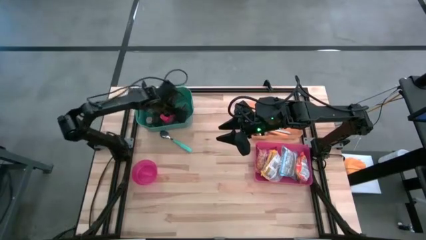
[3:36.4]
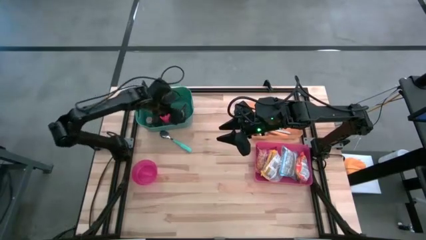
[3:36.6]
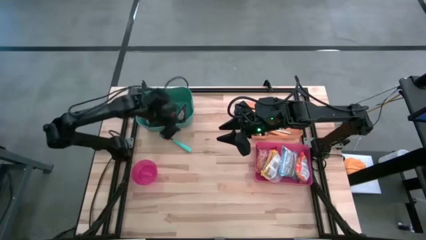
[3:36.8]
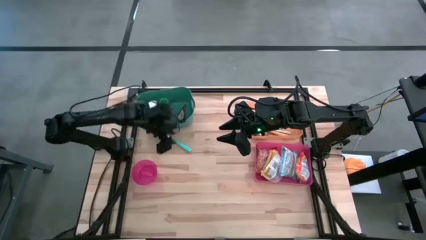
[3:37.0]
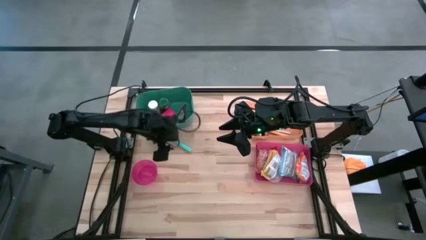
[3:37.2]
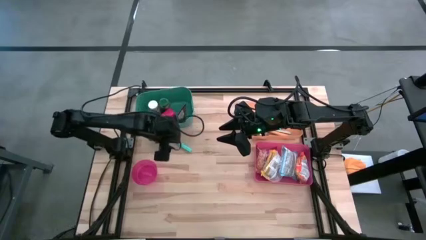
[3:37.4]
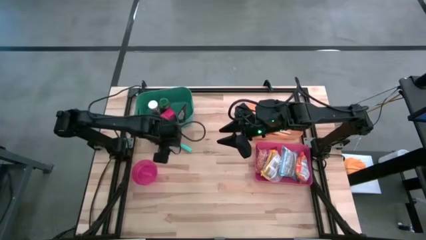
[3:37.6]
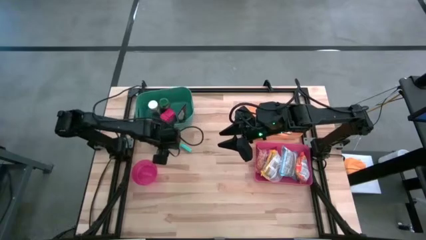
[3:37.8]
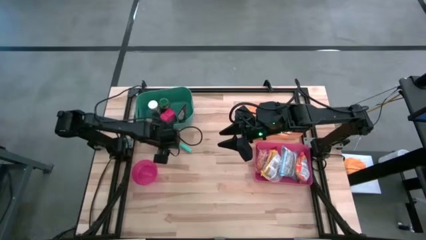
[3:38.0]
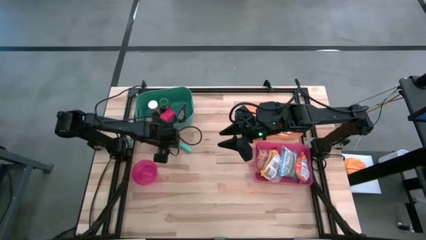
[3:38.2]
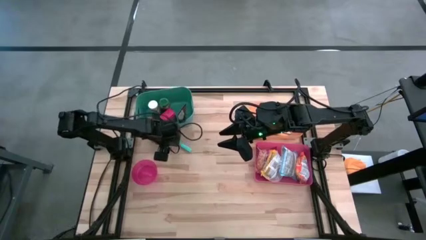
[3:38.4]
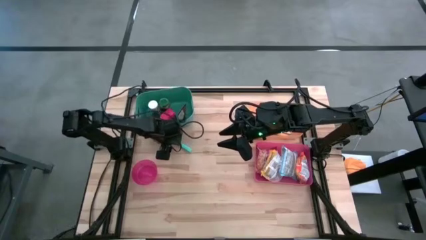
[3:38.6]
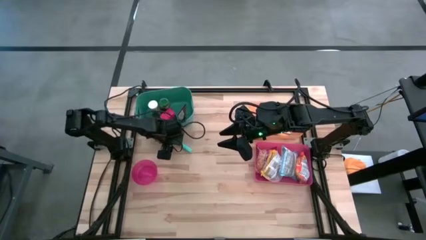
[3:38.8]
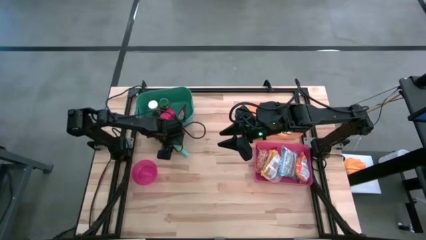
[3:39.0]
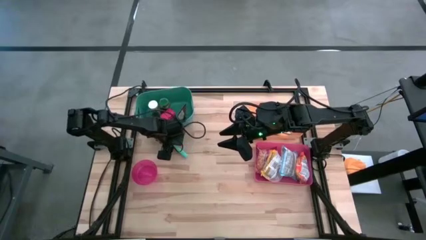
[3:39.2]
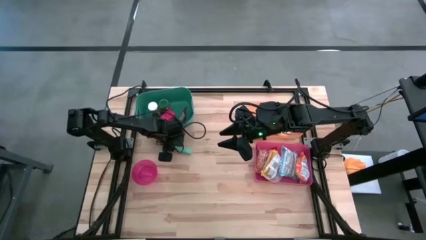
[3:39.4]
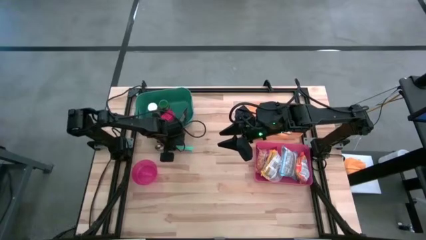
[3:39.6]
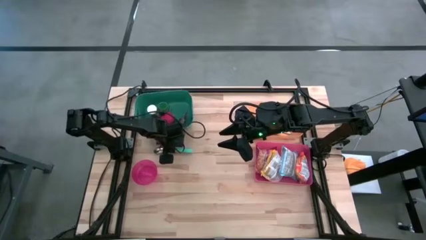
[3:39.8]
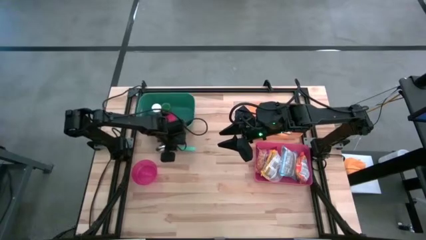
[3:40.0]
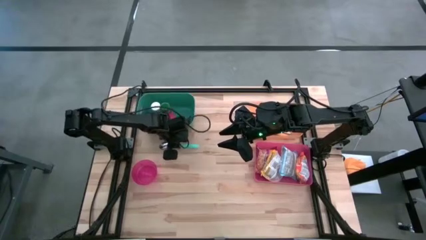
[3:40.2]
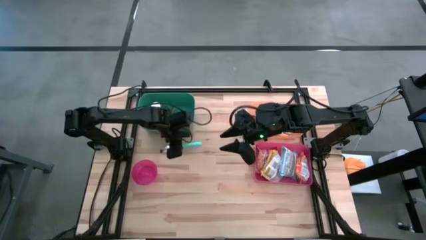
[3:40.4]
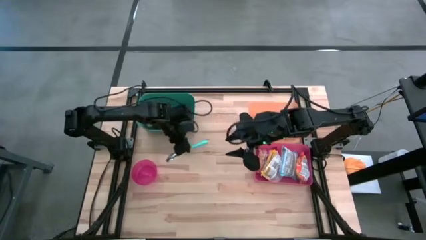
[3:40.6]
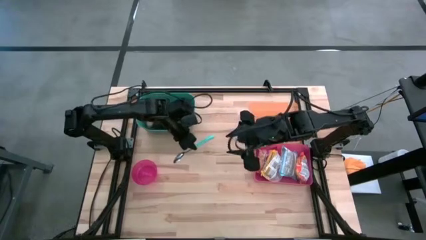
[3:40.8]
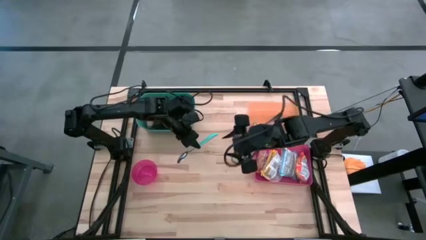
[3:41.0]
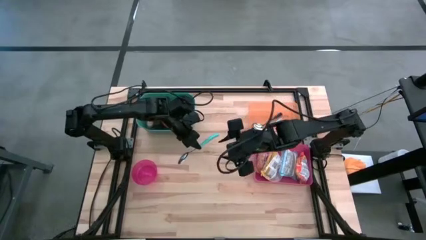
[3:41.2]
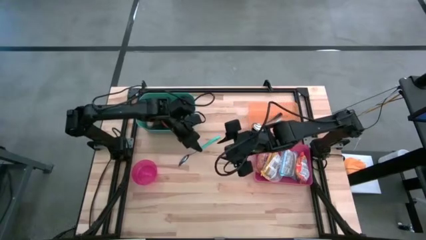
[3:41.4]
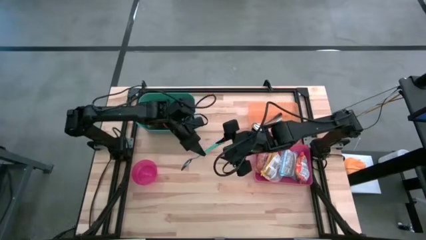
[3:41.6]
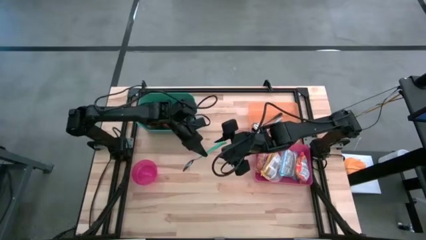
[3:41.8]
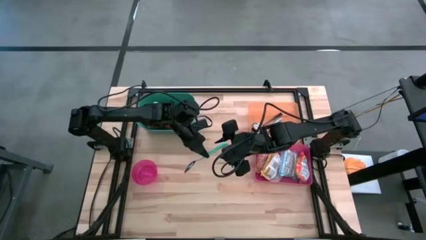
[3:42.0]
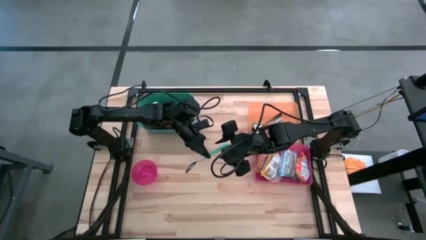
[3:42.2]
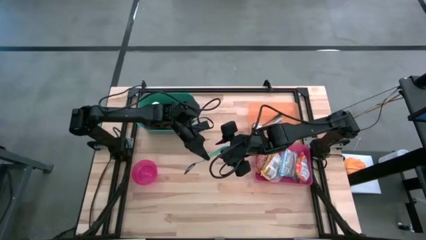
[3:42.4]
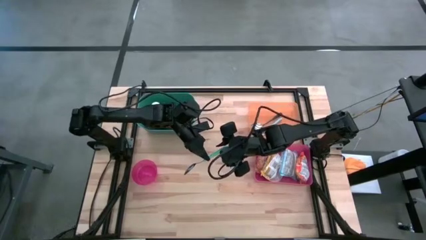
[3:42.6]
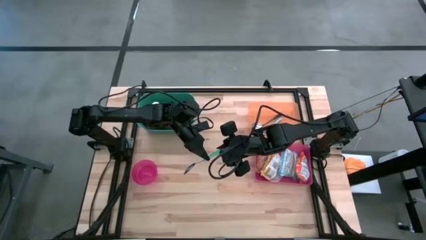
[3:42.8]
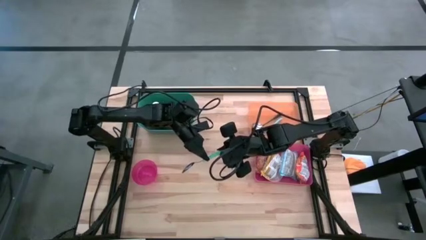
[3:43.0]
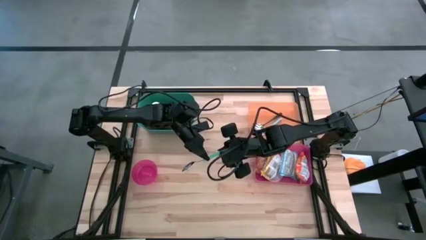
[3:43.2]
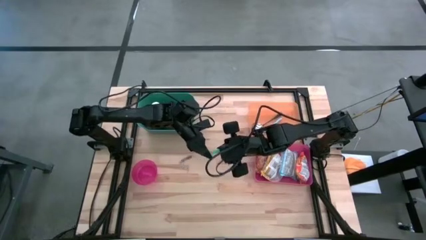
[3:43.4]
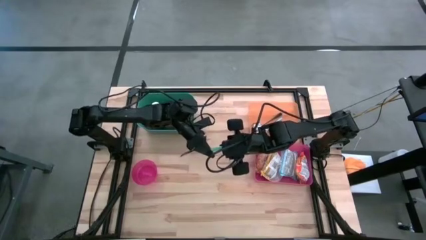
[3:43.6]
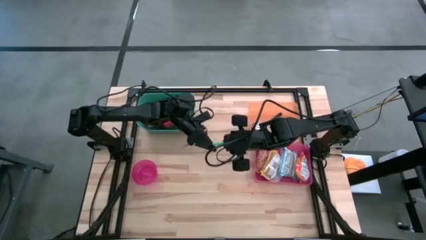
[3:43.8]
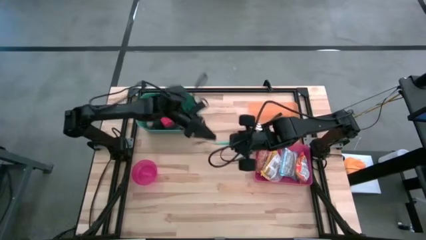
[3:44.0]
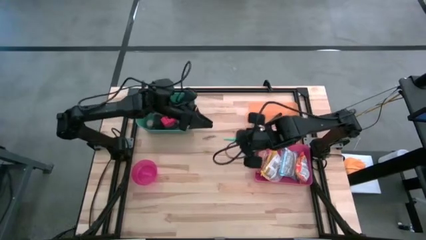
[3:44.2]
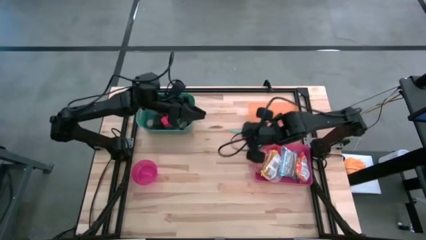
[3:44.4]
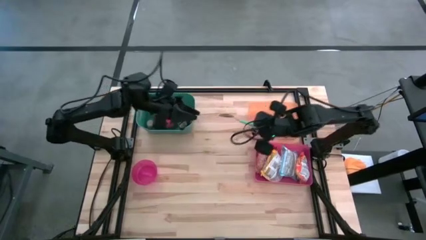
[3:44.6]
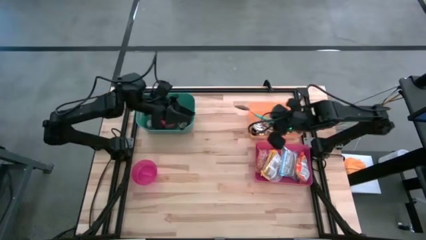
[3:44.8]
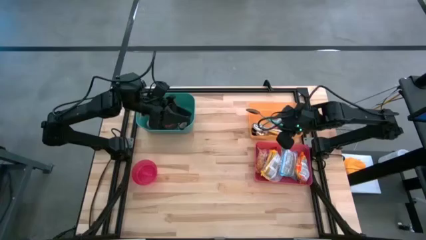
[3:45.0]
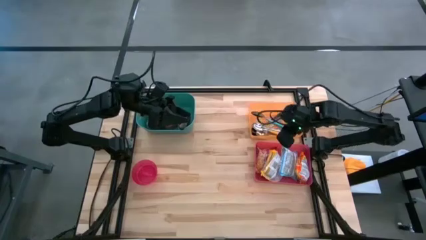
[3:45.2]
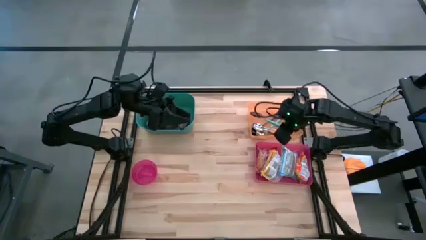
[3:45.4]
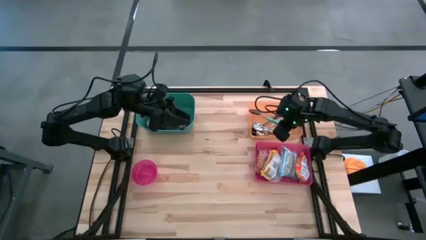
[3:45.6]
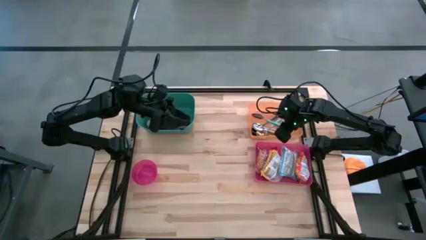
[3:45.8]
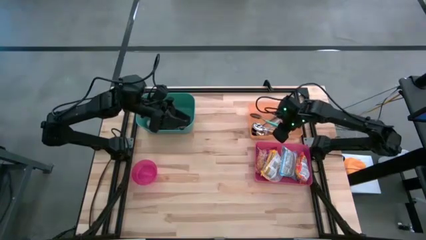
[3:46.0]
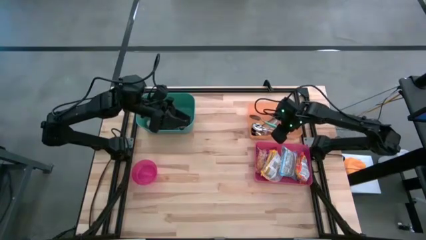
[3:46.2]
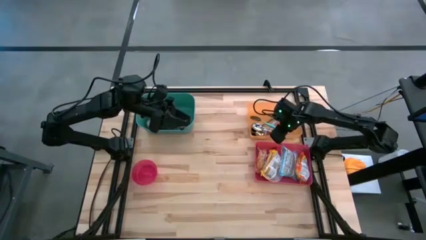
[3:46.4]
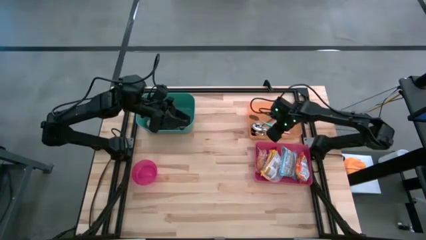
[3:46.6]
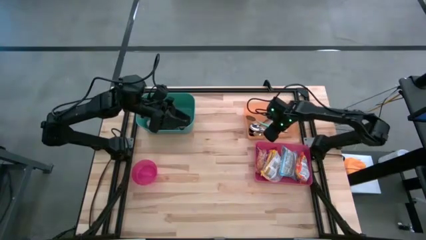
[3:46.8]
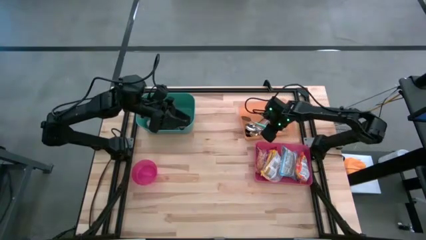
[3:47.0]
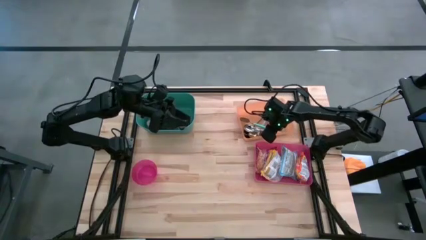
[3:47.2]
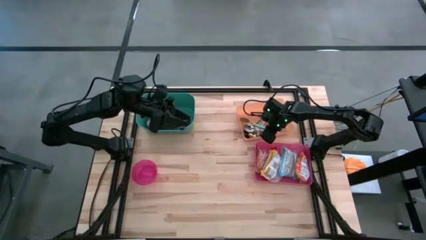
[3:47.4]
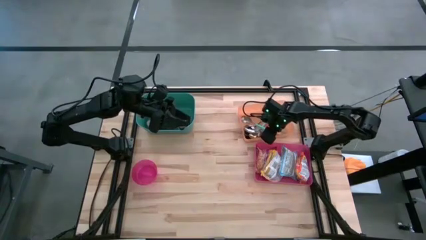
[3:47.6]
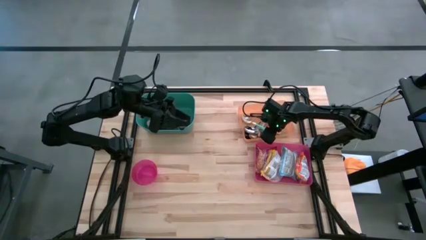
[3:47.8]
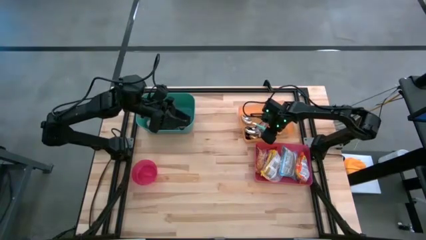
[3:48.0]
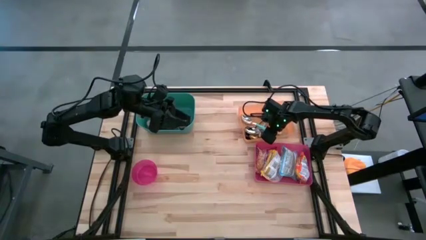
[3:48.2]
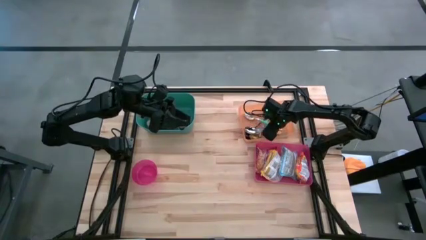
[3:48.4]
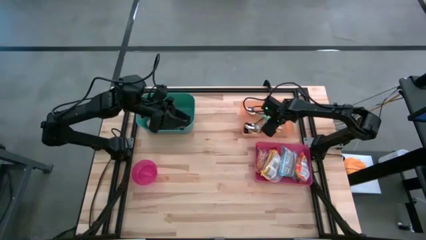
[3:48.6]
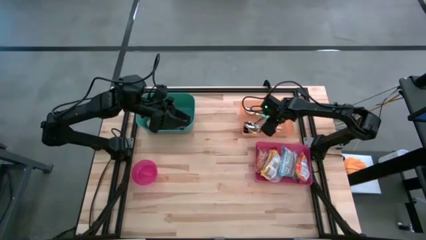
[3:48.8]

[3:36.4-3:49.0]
Put the light blue spoon into the orange bin
